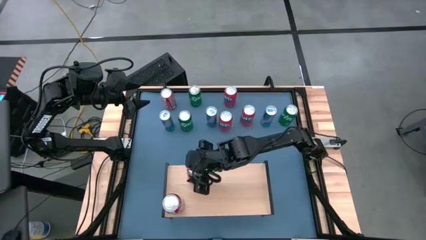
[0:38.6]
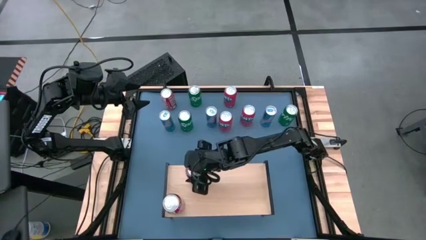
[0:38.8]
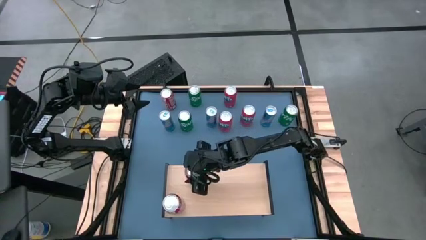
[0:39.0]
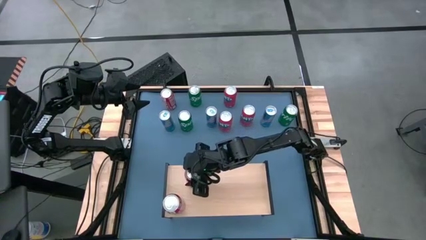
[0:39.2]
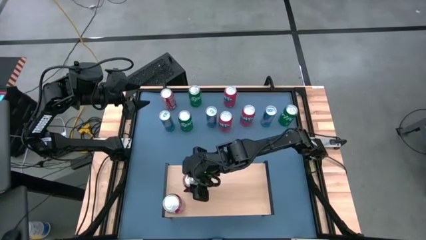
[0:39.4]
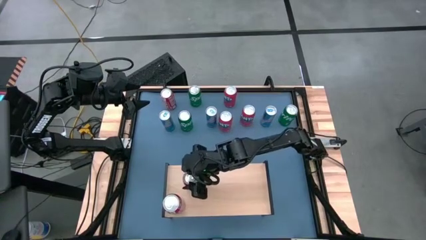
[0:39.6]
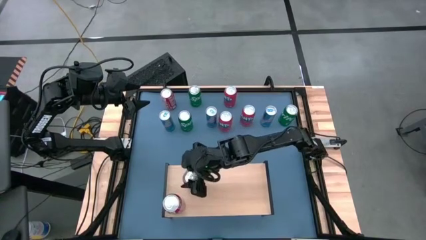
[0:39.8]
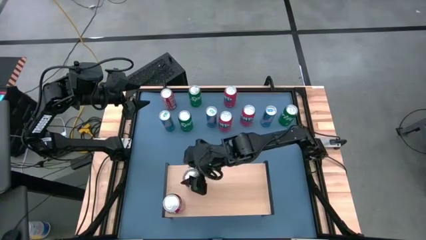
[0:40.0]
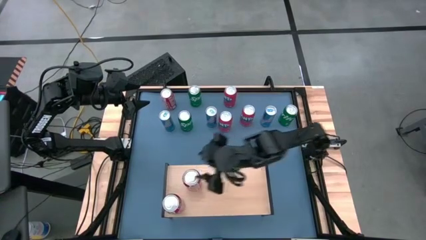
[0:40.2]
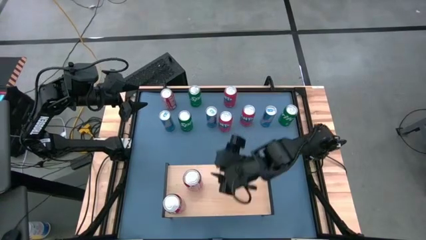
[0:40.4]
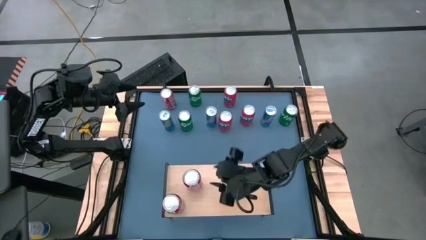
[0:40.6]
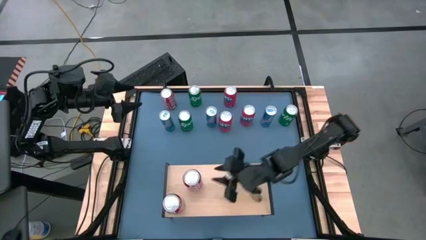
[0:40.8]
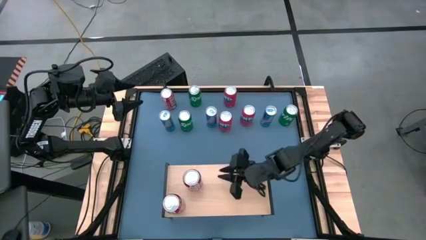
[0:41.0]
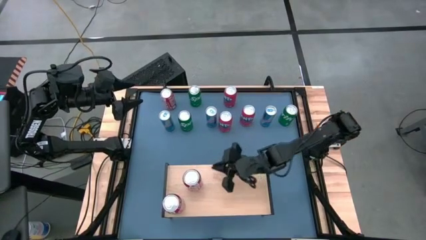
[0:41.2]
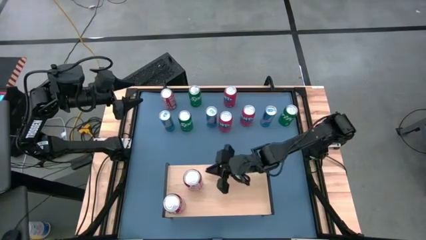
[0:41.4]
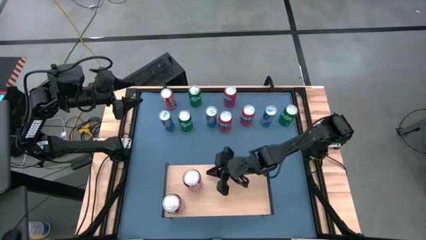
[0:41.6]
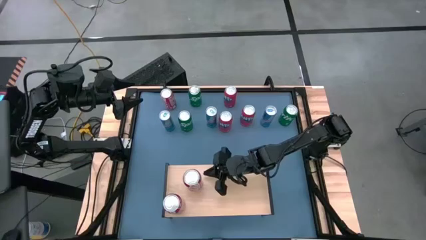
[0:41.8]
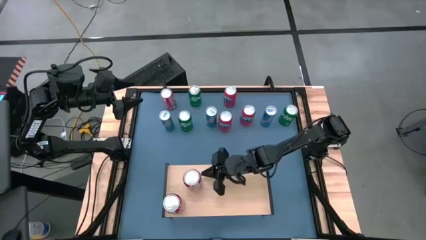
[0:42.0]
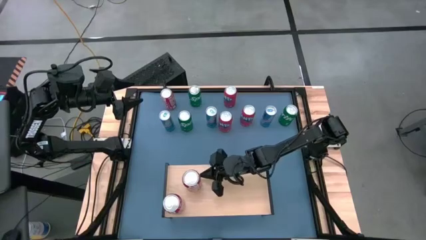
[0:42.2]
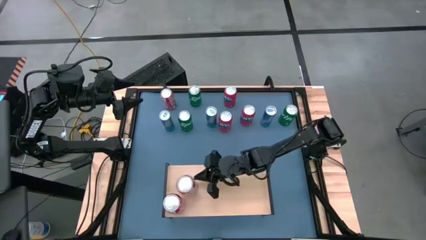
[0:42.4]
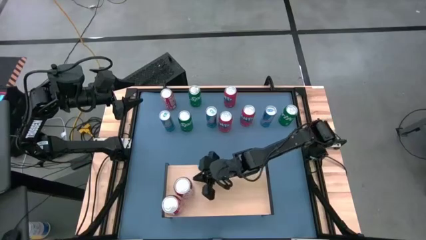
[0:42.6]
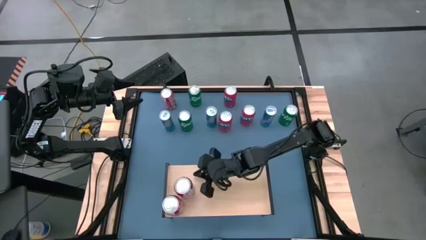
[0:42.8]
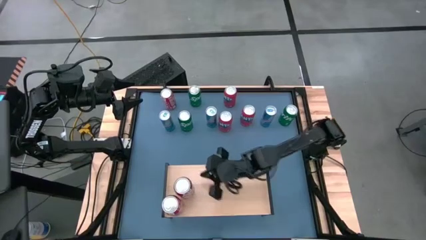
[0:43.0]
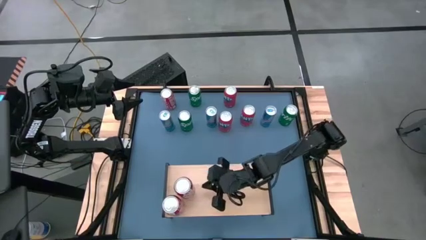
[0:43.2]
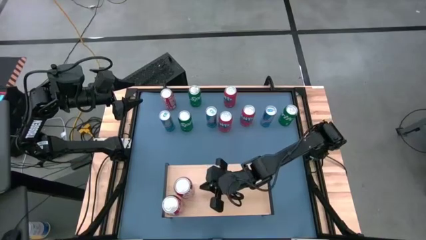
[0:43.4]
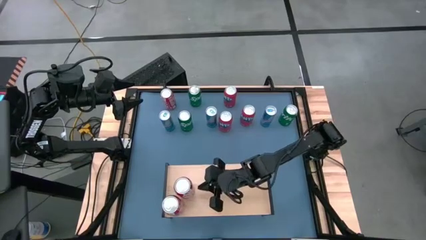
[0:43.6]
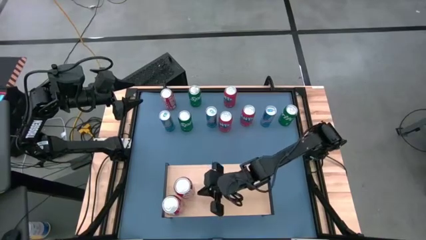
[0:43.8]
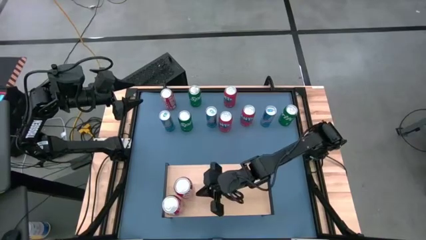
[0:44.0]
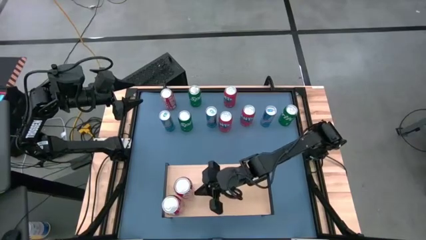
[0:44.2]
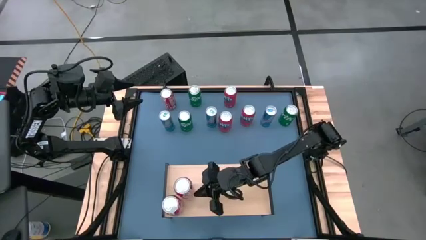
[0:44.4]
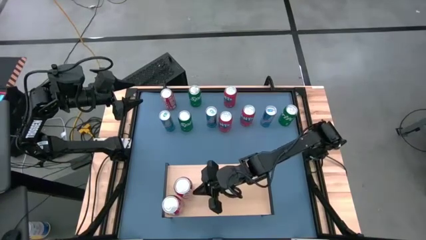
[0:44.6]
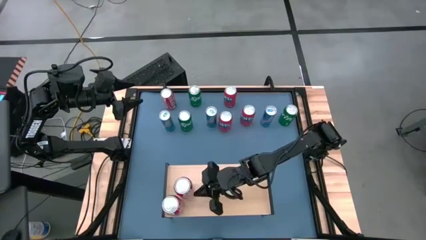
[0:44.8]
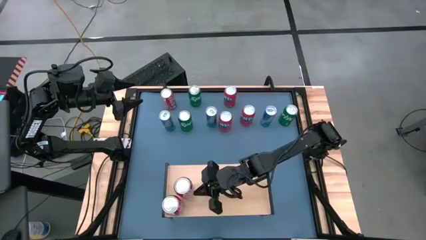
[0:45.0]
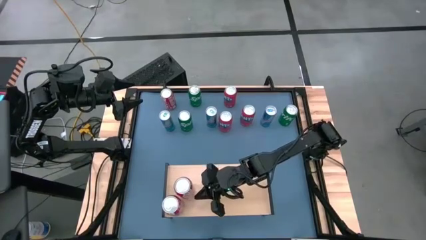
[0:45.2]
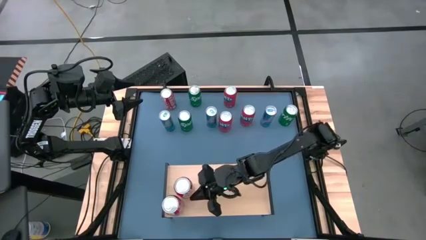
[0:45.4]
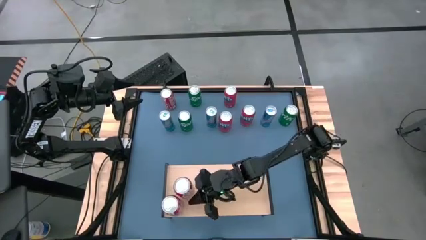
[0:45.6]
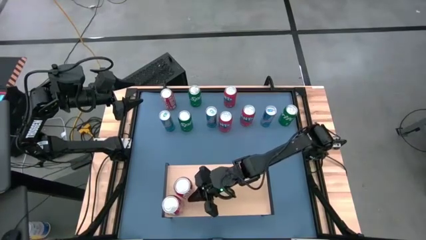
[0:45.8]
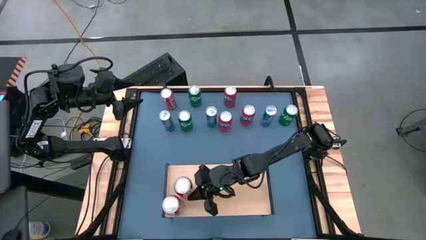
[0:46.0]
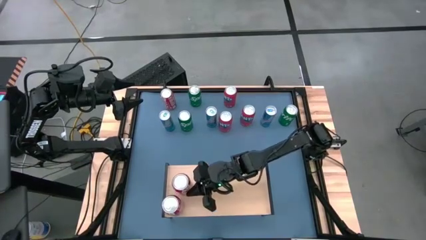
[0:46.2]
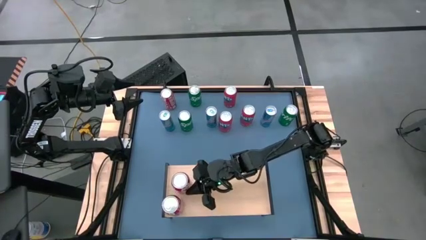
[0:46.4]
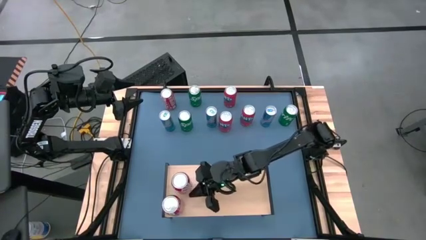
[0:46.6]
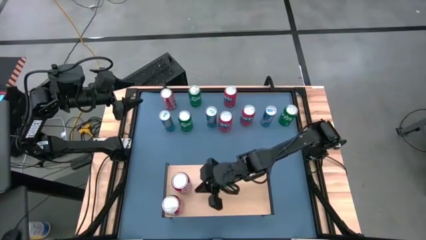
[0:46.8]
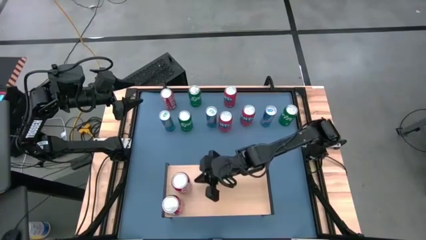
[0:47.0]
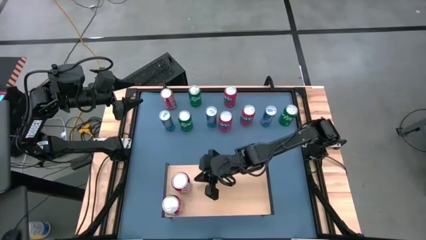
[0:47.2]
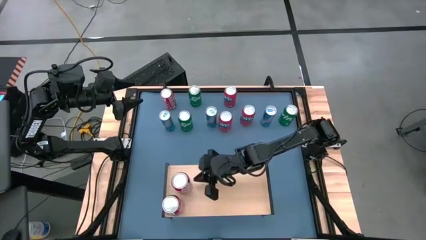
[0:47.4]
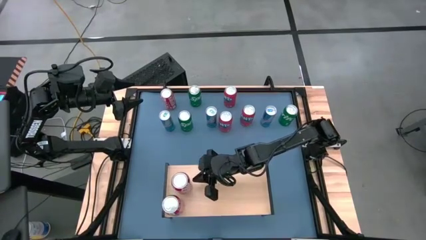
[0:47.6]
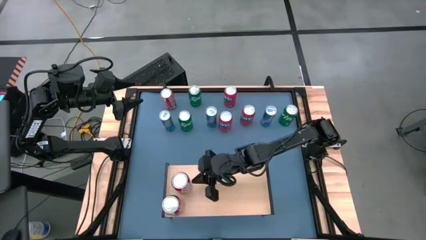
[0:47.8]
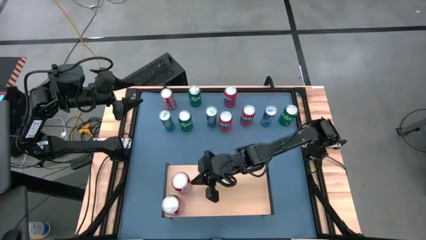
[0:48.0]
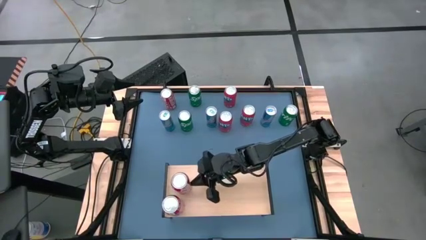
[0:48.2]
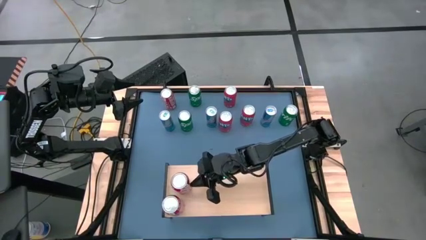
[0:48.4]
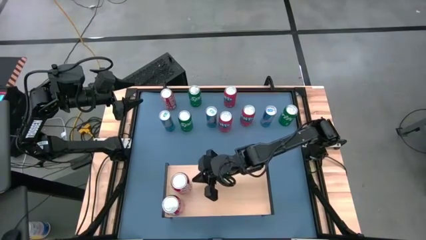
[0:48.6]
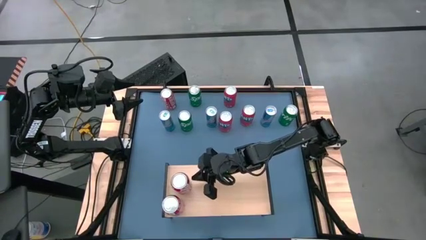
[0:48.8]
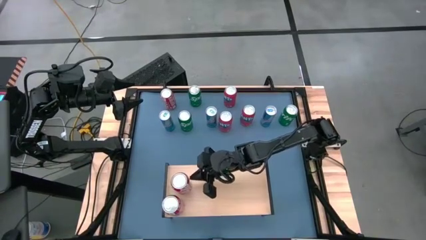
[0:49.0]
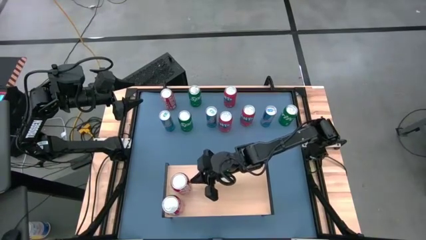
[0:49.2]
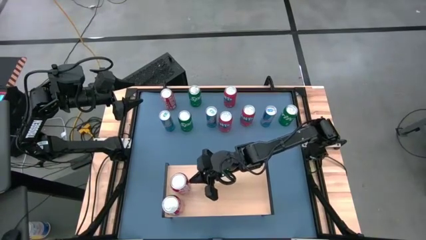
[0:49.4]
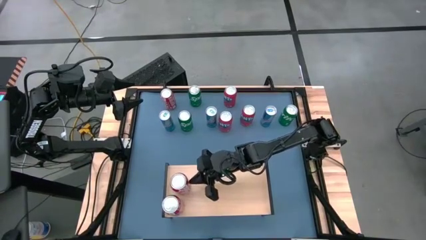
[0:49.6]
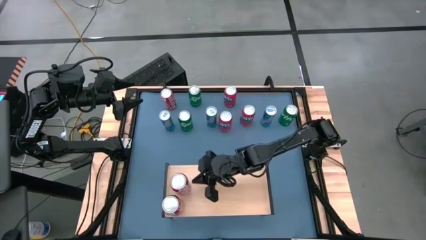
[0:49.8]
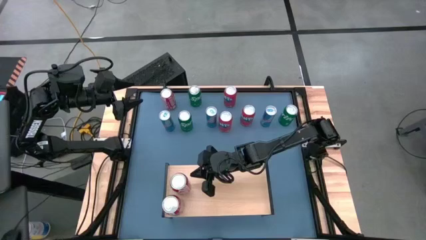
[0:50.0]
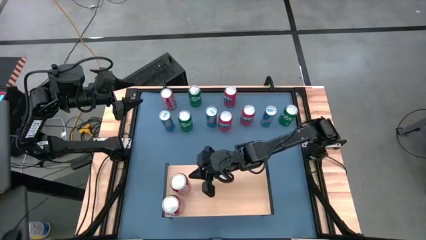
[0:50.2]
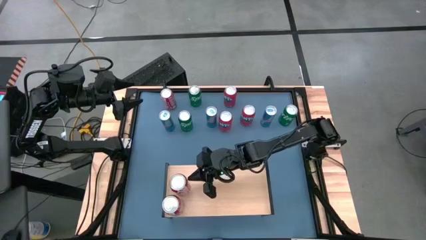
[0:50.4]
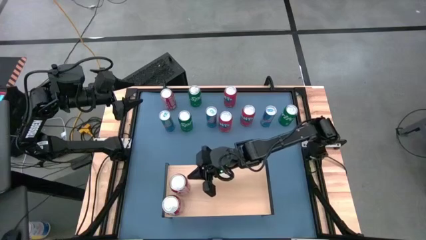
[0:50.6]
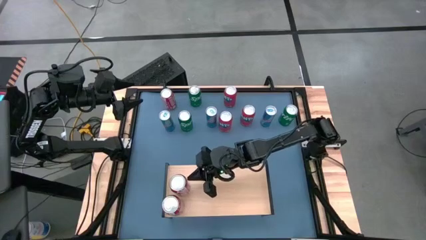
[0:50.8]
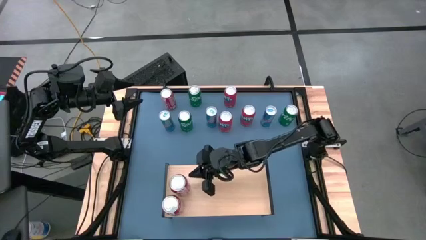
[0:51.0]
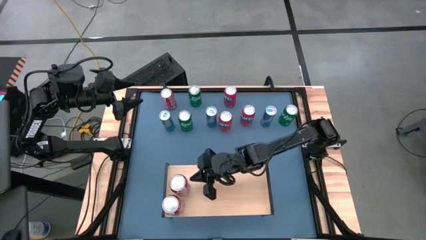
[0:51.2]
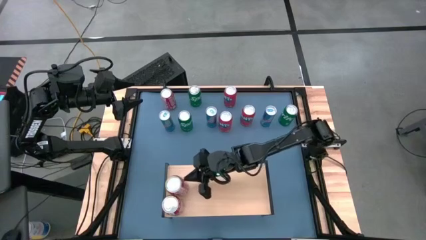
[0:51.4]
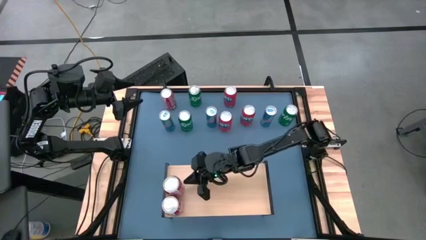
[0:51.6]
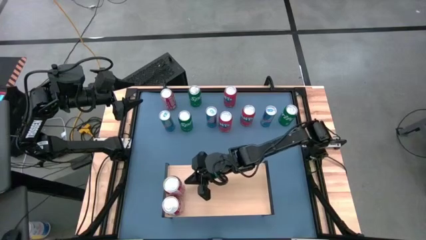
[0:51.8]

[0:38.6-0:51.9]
Task: Place canned beverage on shelf
Put the right red soda can on the shelf aligned with the other red soda can
